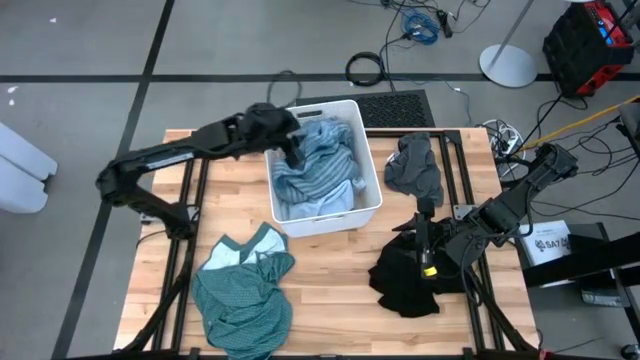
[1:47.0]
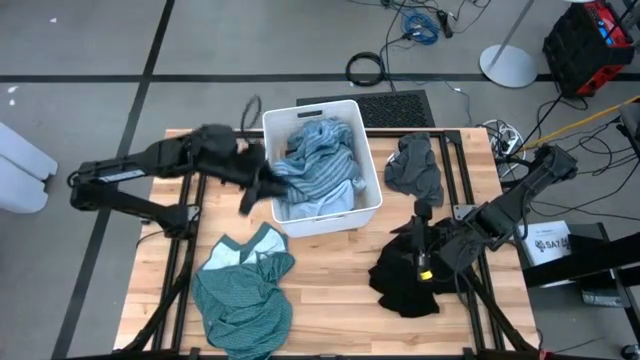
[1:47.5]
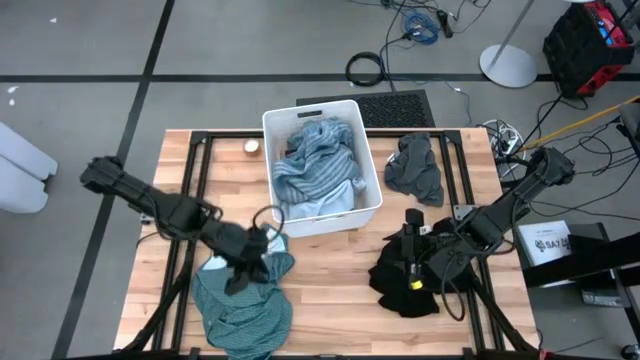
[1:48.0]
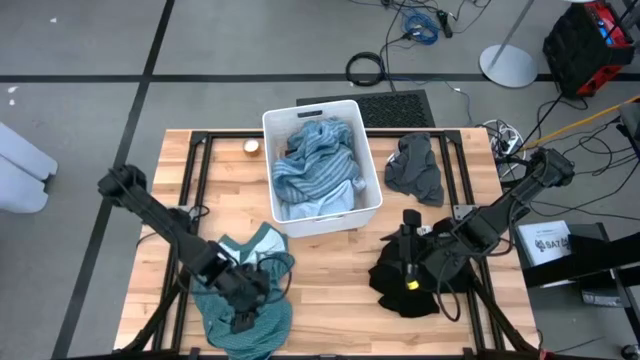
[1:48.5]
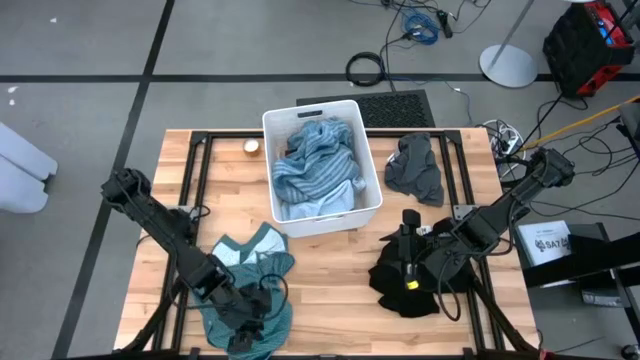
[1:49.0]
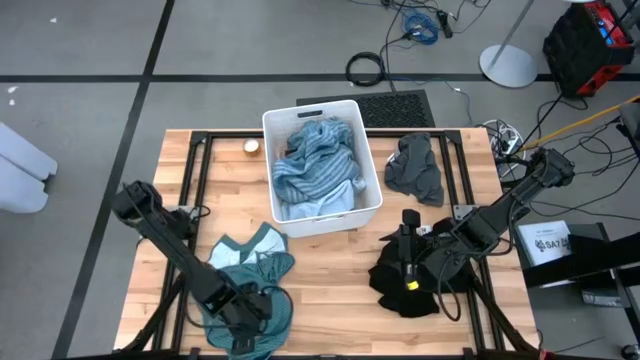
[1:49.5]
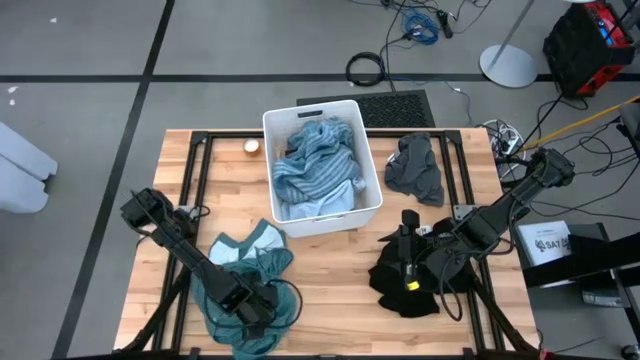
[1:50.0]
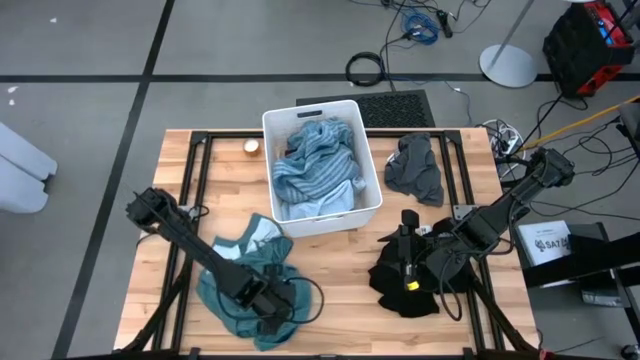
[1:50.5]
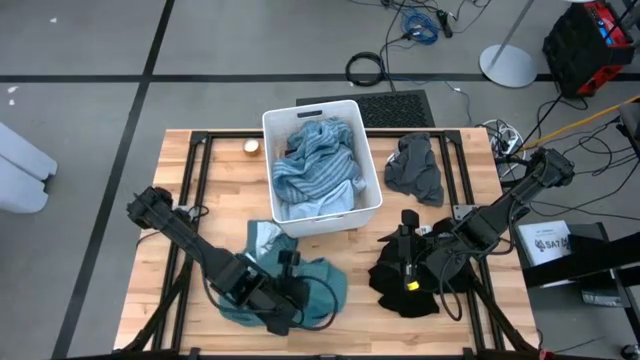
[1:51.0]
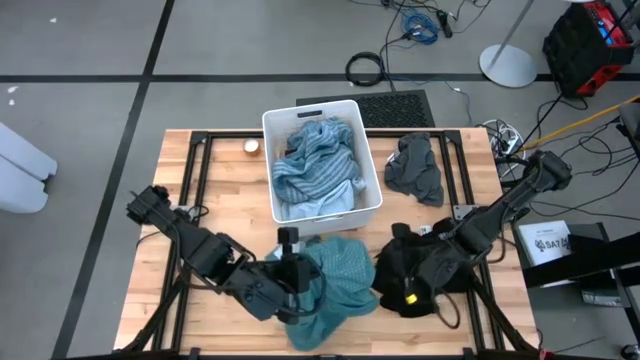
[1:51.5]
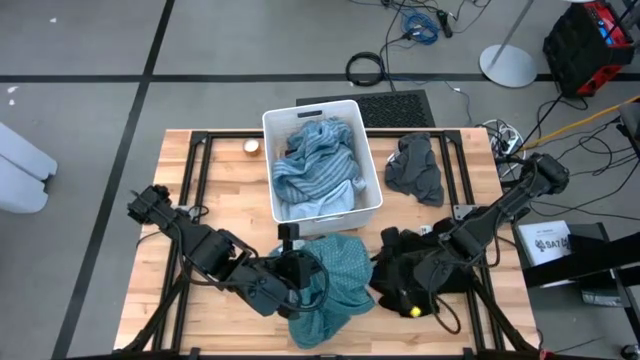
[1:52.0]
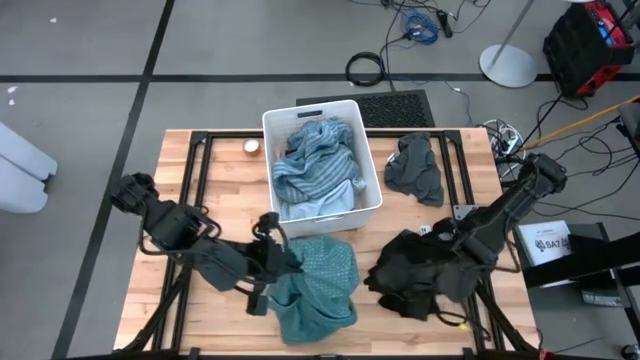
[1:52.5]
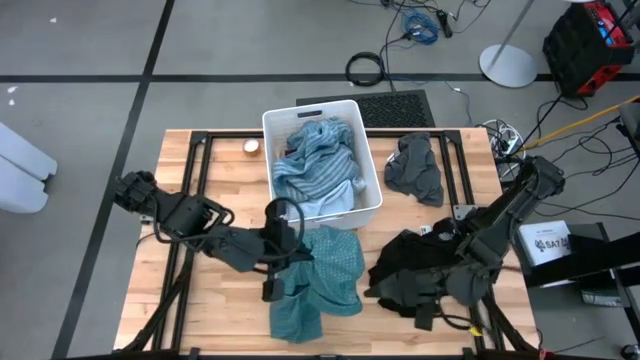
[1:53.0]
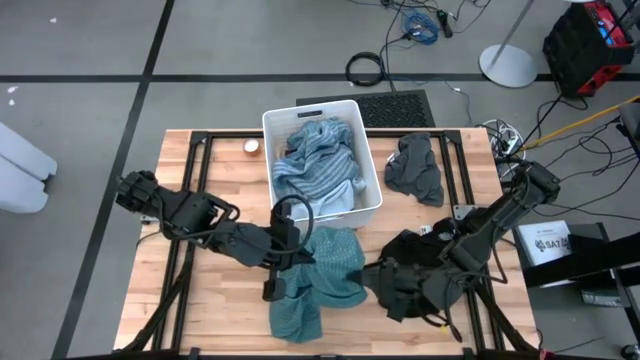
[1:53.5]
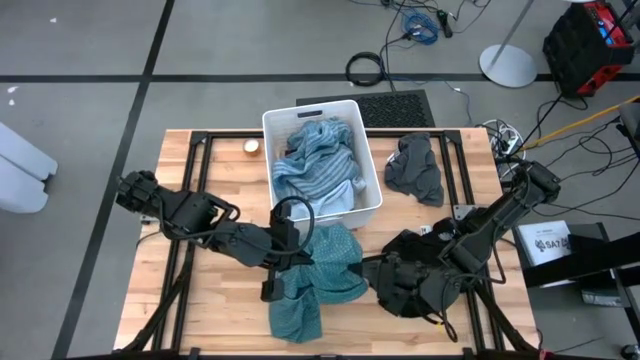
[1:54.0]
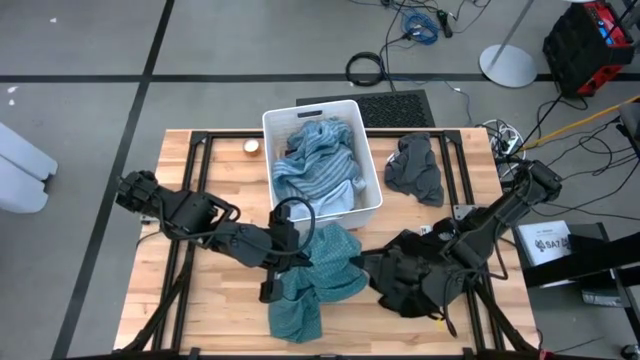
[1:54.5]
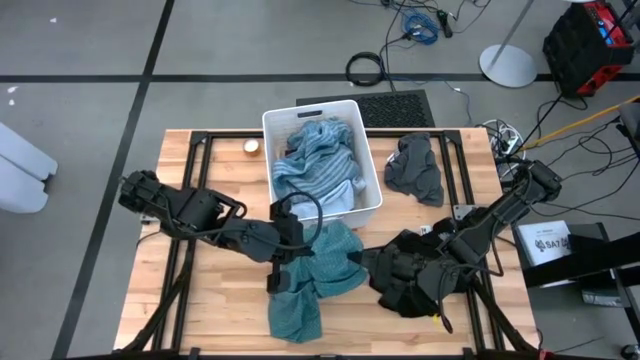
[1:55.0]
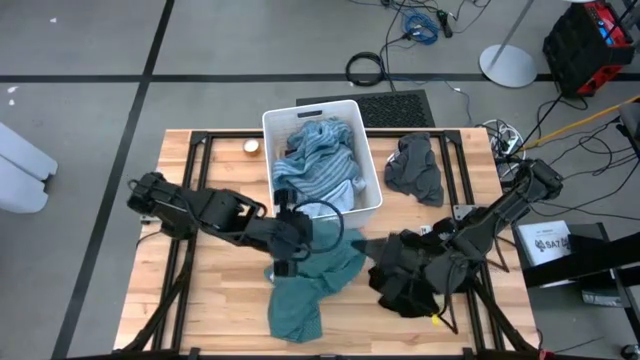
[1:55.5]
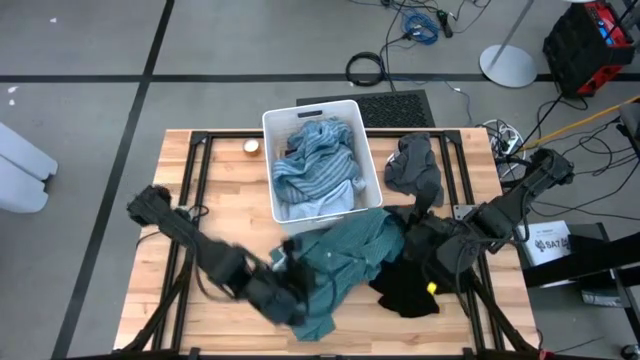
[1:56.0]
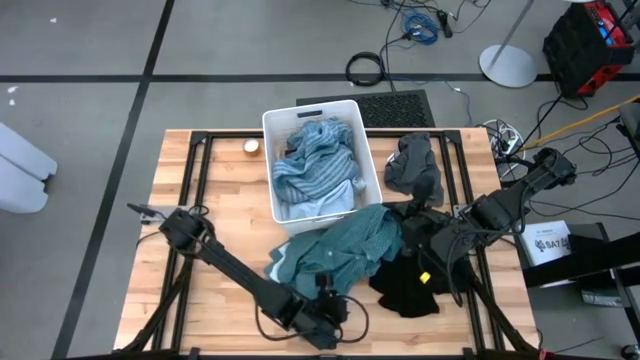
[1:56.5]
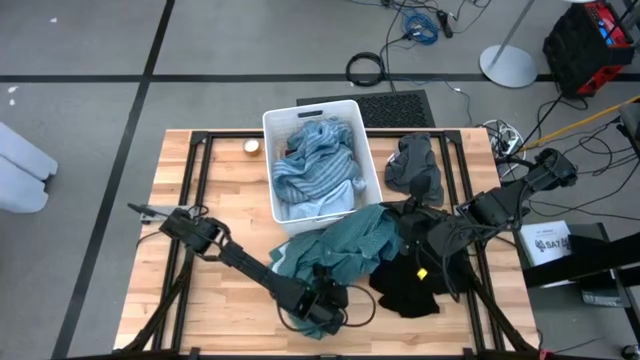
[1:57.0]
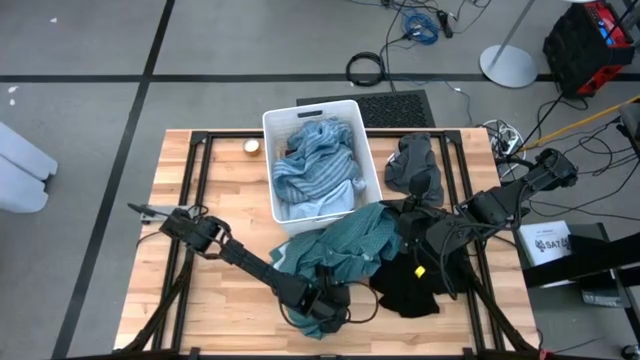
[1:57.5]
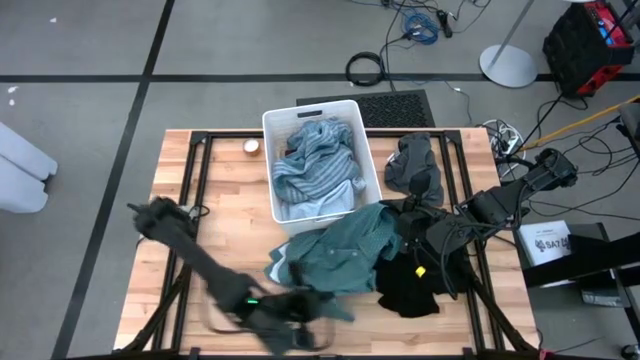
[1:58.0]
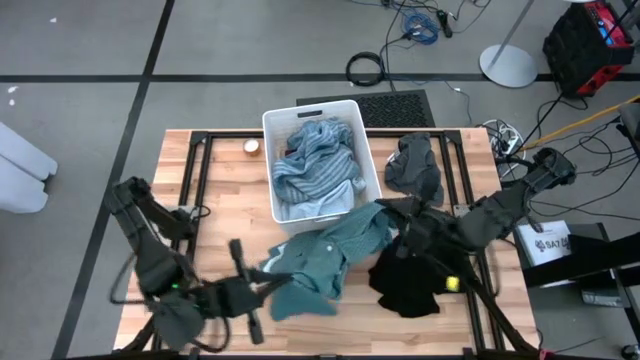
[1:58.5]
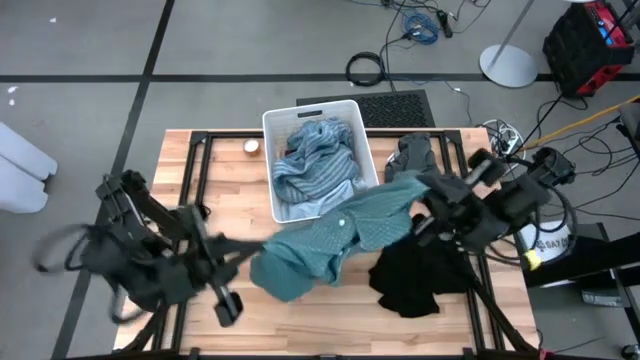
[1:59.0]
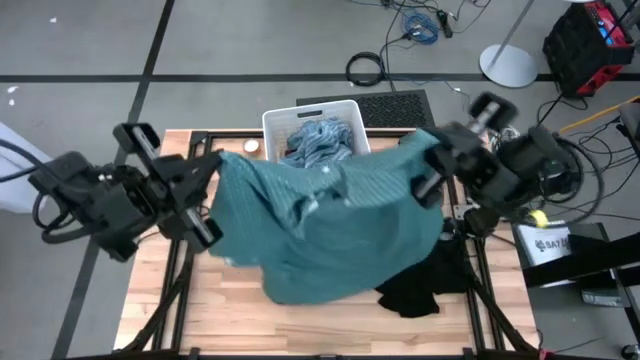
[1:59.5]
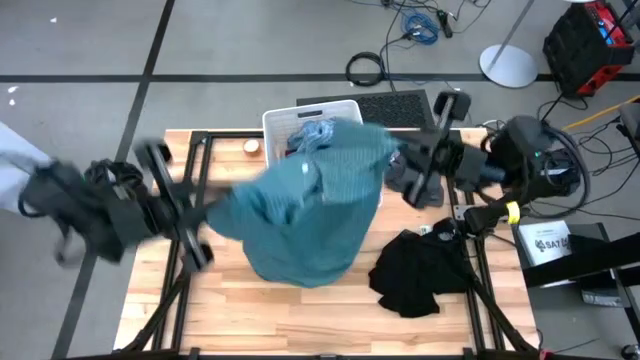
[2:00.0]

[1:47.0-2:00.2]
Task: Sort clothes
Put the green shirt into the white laundry bin

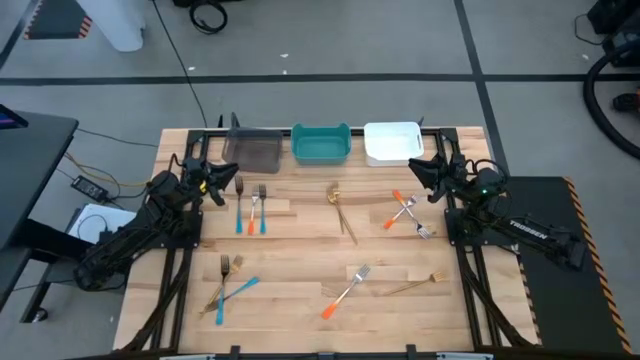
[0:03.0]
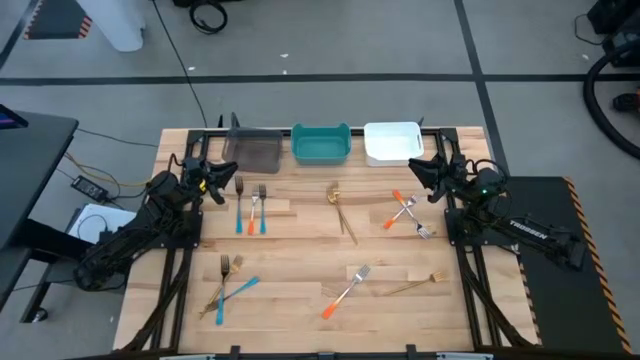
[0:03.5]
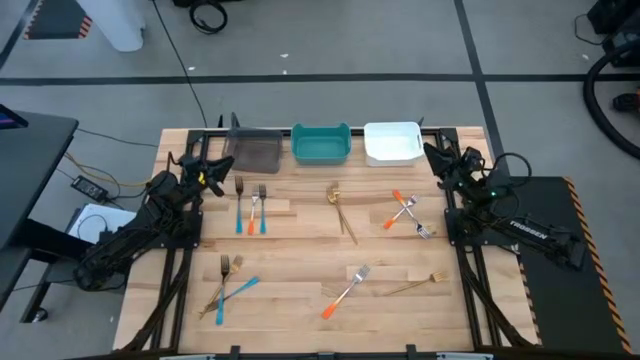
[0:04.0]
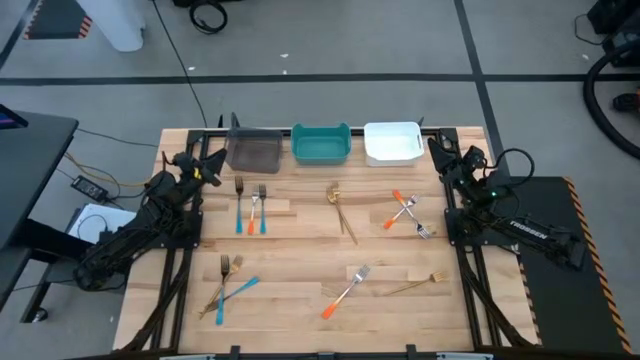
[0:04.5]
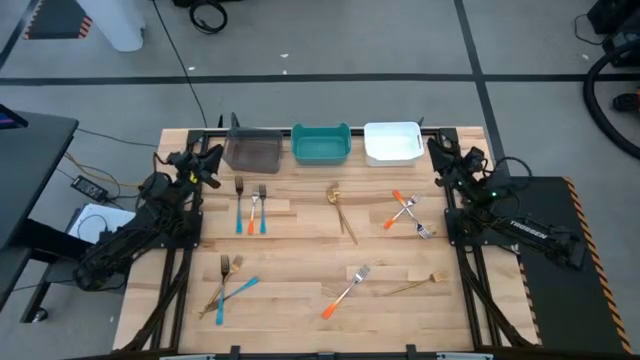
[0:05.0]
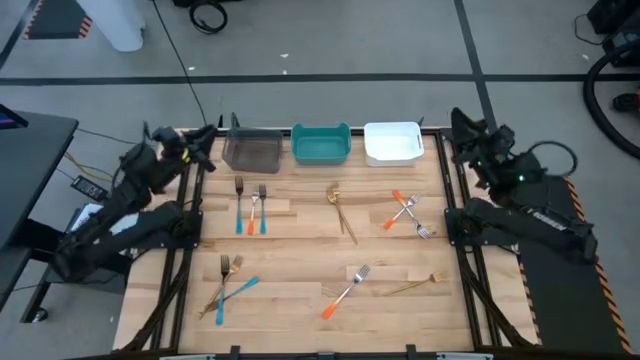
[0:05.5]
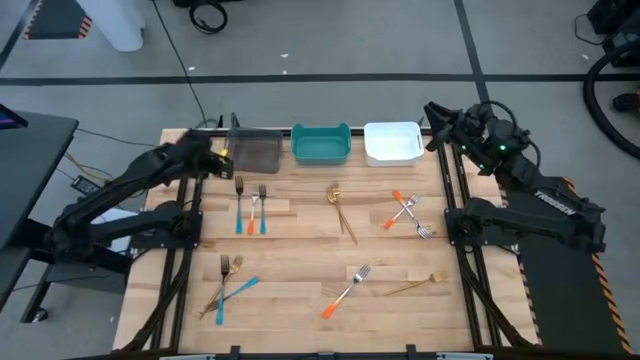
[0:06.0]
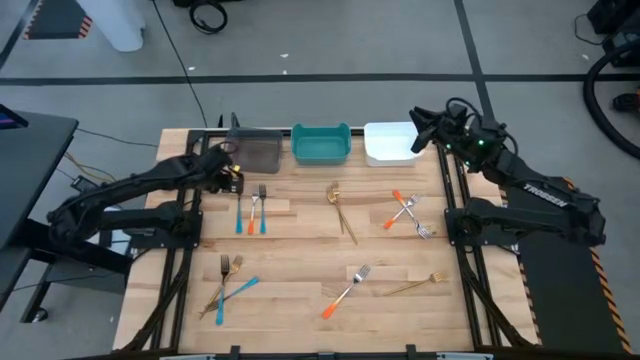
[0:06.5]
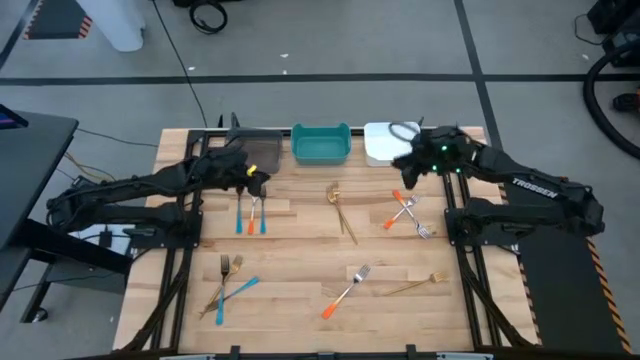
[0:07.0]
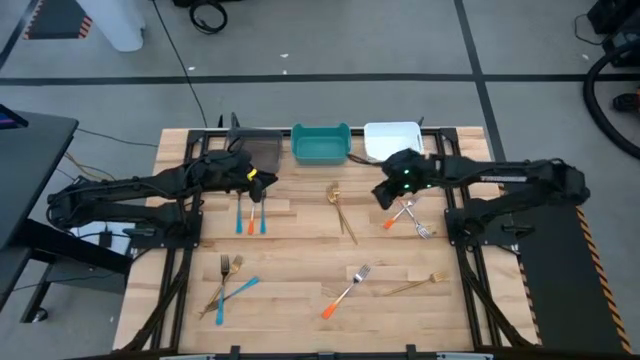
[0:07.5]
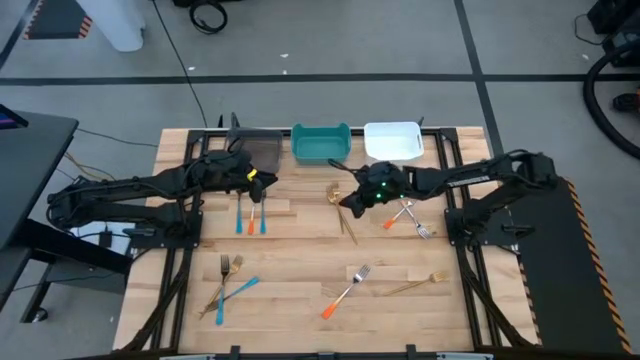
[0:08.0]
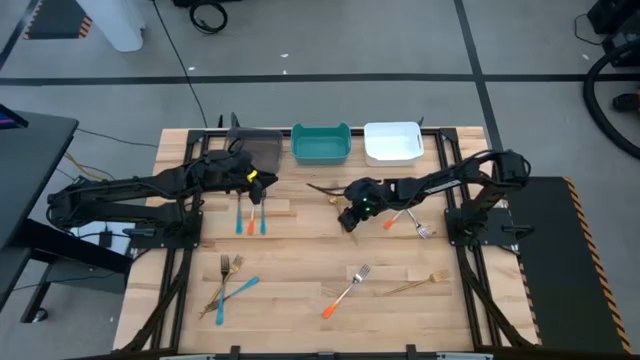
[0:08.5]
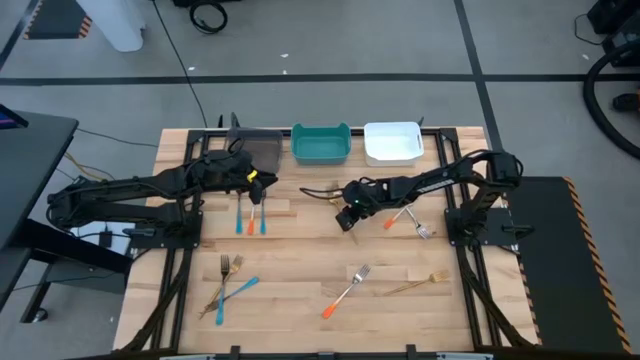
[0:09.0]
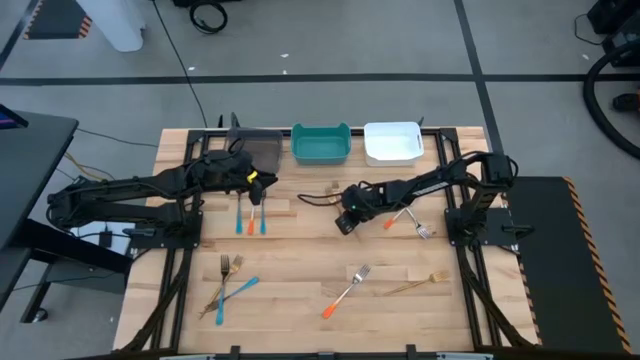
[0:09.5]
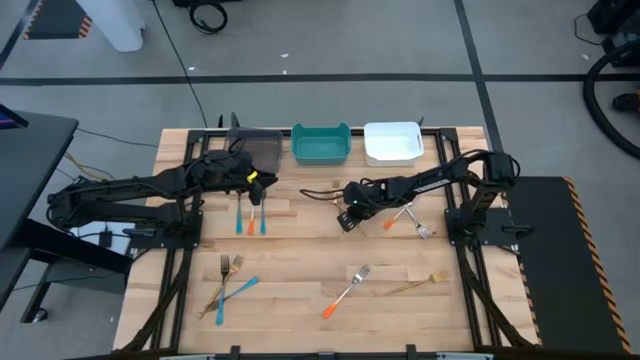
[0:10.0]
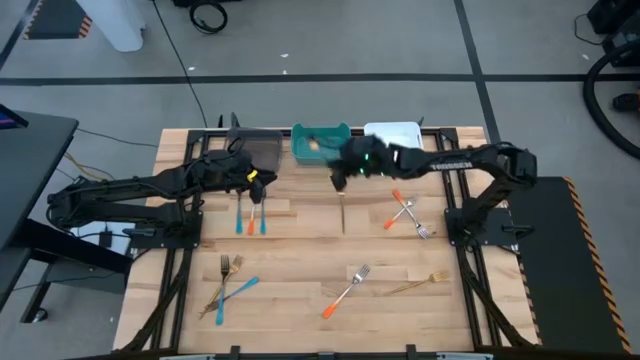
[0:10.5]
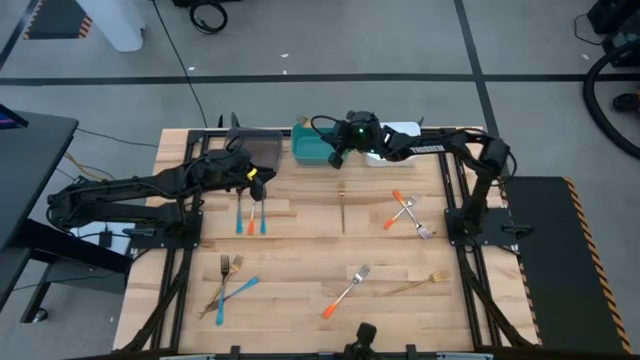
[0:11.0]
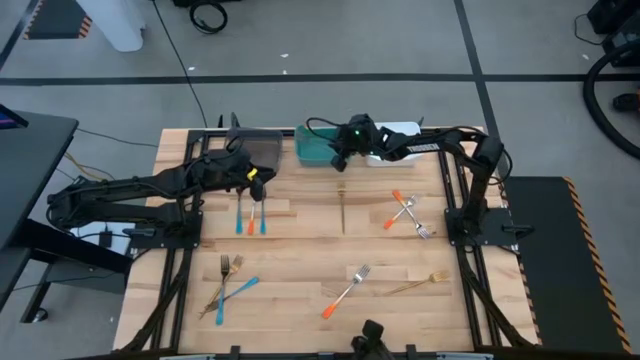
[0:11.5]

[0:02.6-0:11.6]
Task: Sort silverware by color (type)
Put the gold fork into the green bin
